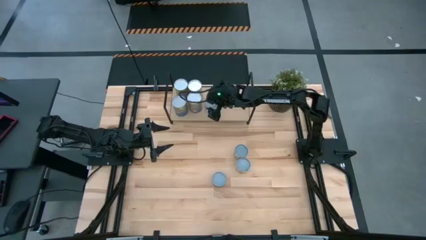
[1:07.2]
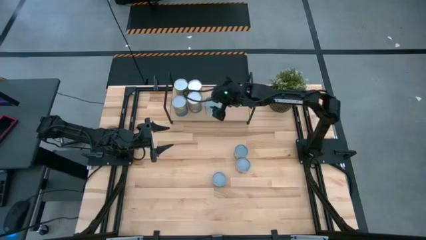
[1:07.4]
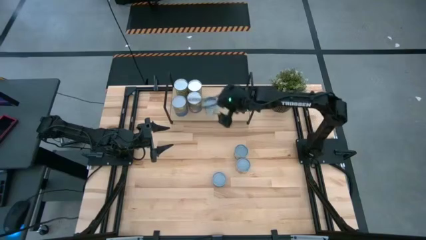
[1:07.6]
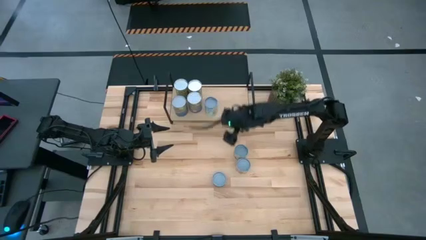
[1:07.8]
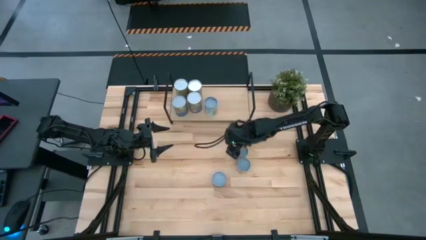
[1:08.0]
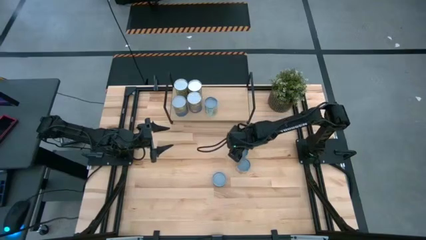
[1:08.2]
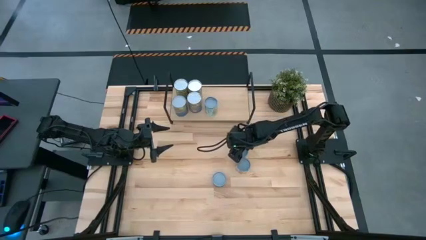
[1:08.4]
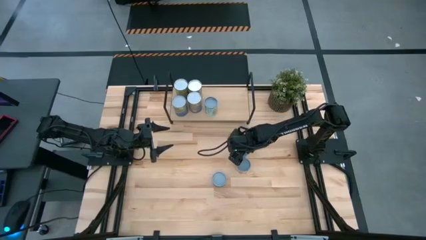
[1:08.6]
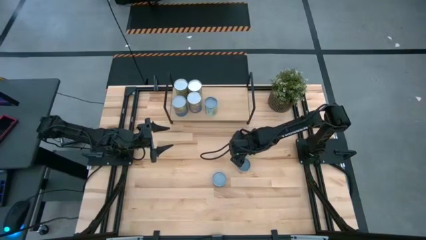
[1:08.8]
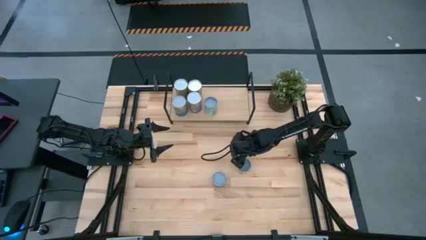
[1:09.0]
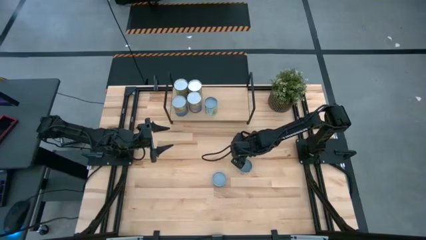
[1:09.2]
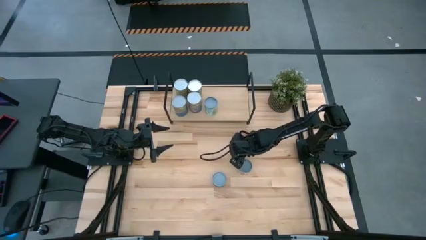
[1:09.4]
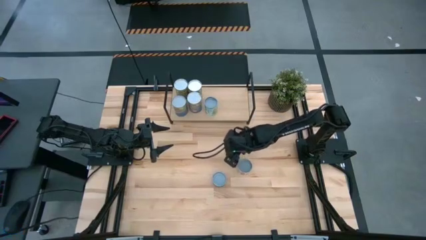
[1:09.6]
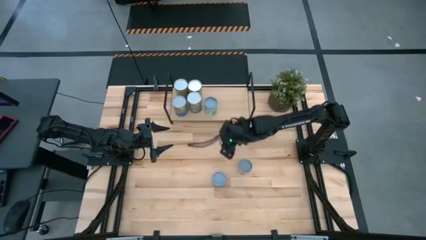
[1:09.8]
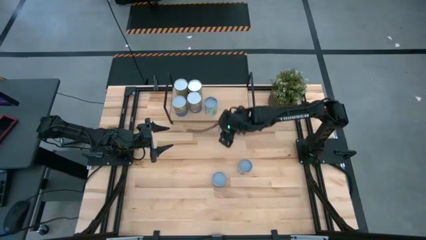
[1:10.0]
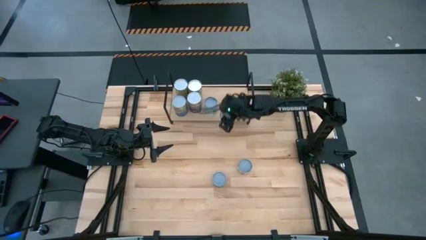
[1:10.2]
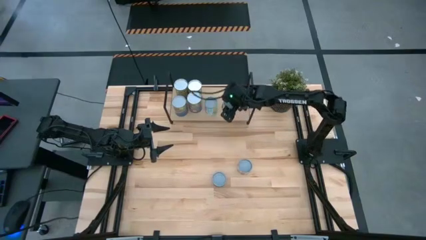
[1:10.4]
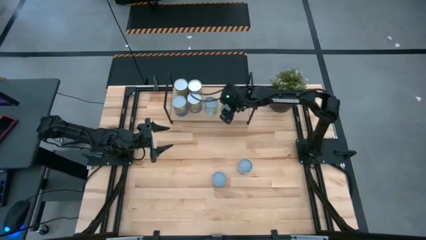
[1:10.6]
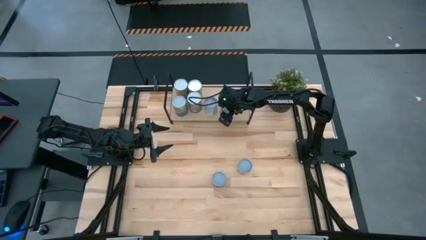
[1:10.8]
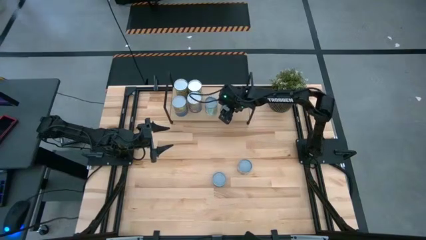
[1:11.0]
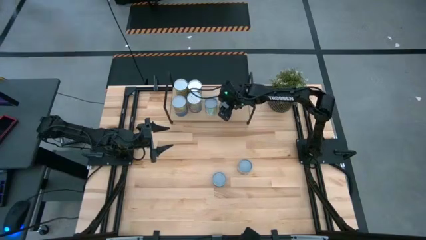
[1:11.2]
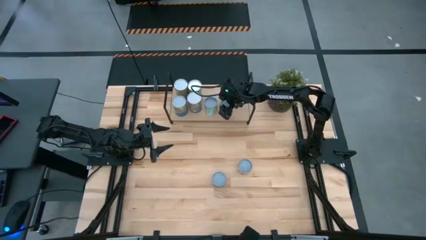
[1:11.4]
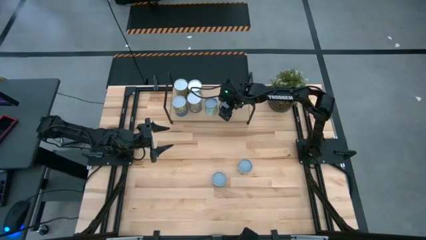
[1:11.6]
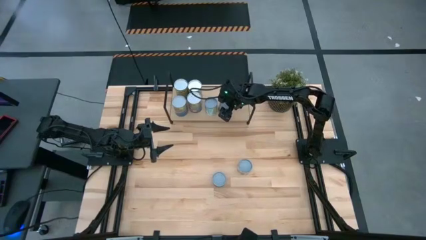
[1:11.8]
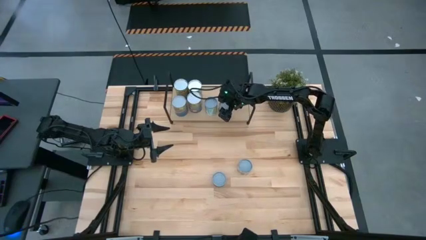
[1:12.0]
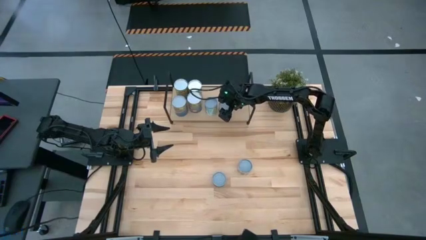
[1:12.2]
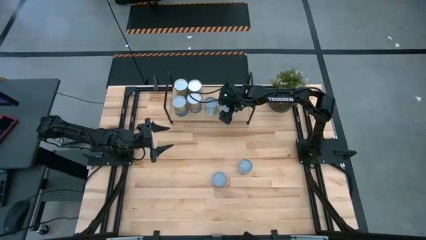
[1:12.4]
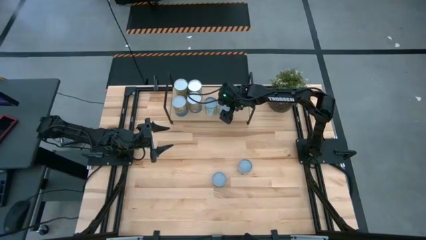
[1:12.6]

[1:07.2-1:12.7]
Task: Pick and place cans onto a shelf
Put the small canned peas on the shelf

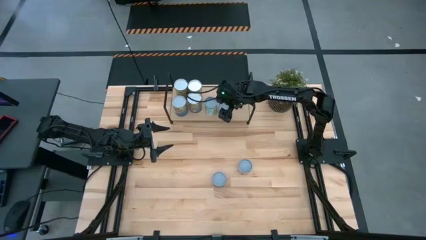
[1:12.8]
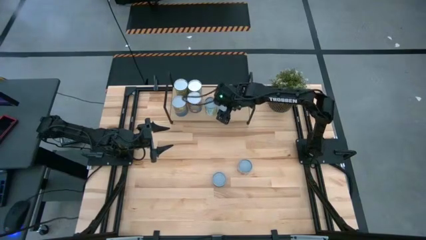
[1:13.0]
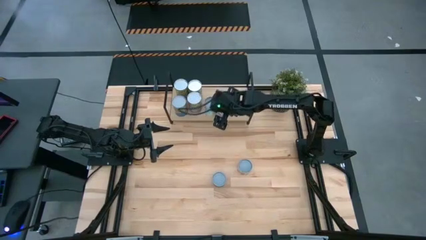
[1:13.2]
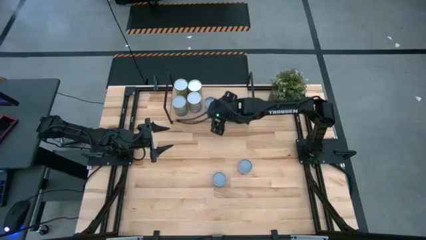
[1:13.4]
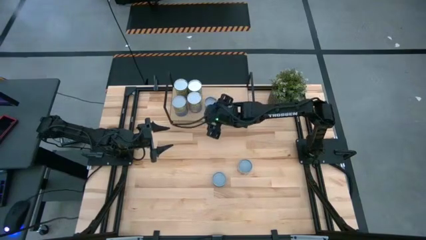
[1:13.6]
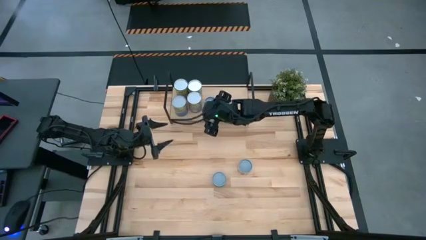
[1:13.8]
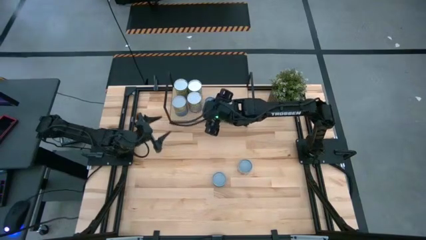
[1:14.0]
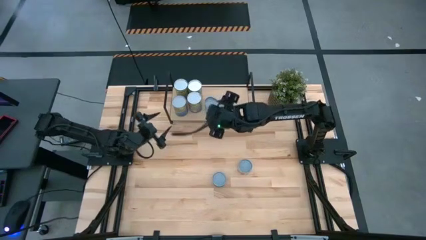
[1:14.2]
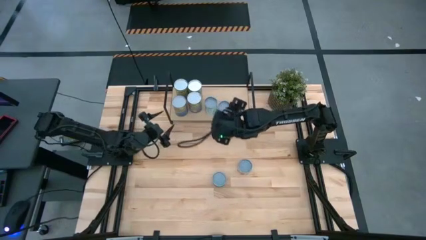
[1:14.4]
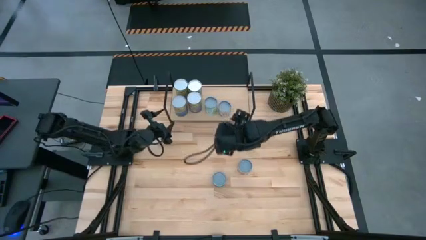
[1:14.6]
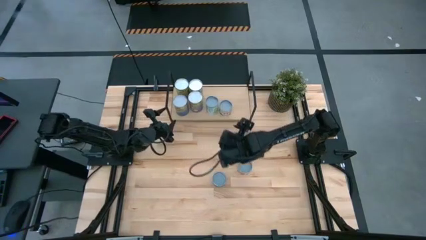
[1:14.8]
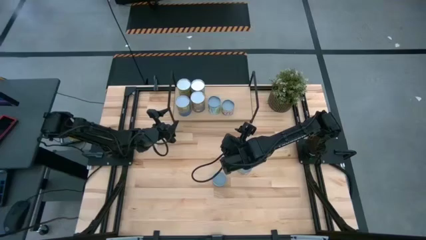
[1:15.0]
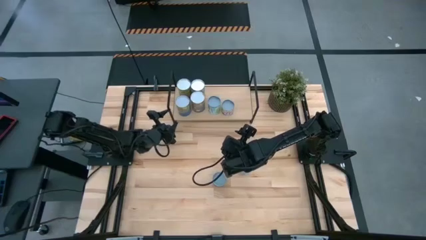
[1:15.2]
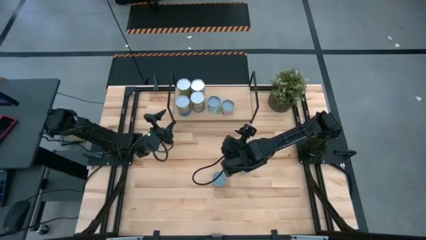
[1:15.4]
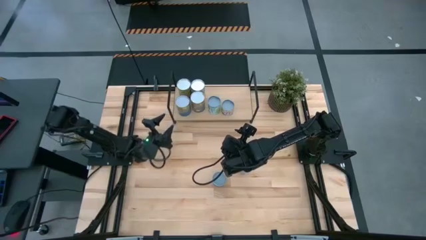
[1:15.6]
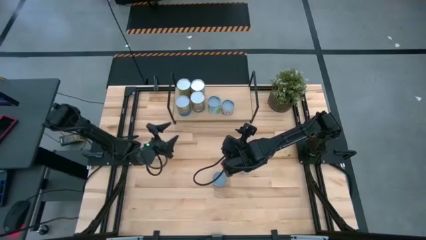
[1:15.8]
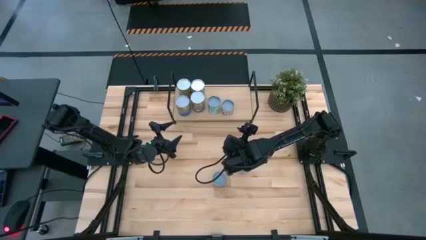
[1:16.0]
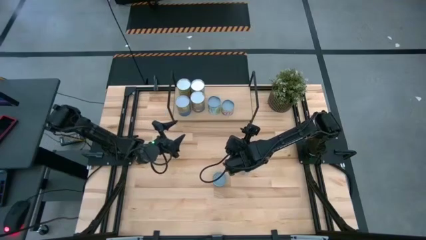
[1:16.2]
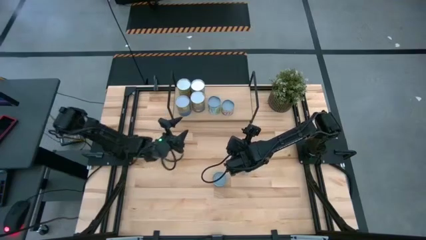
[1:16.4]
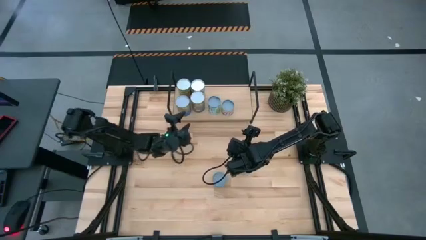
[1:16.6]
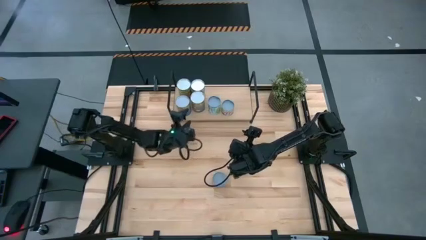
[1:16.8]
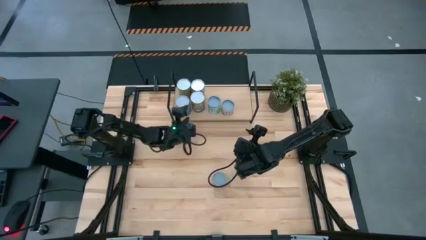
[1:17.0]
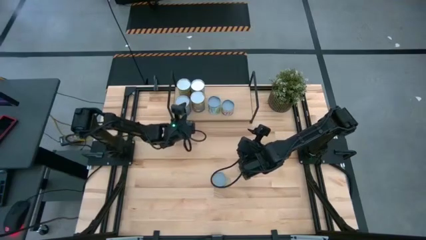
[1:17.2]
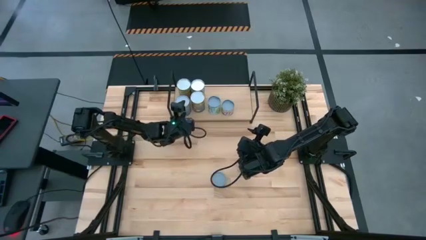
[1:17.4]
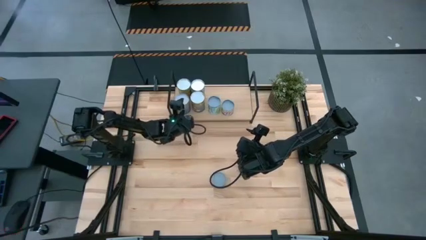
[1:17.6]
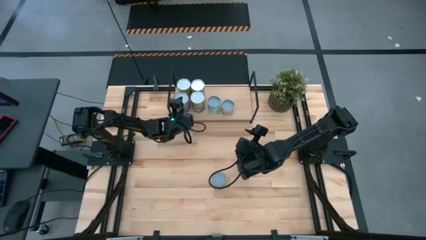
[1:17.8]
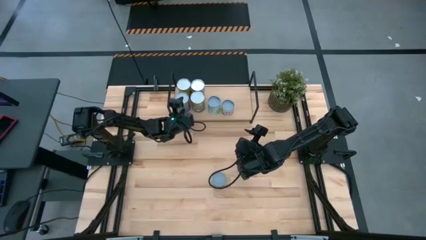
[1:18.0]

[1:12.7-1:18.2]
Adjust the canned peas on the shelf

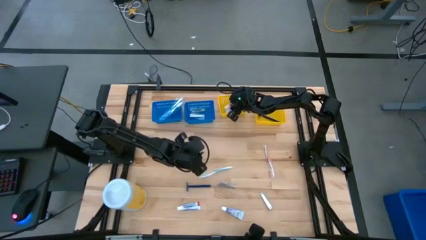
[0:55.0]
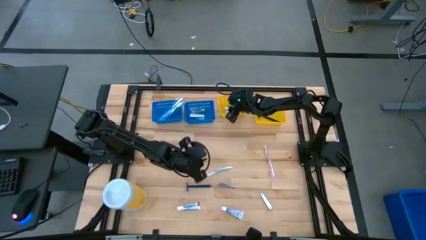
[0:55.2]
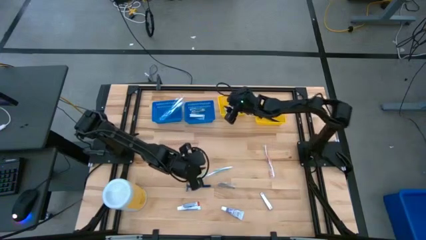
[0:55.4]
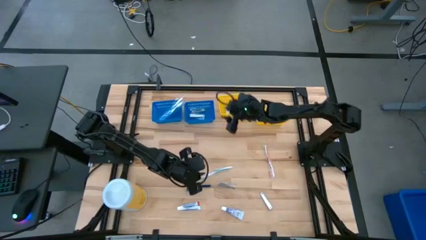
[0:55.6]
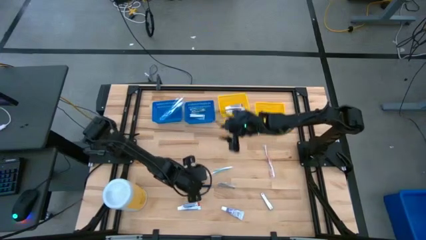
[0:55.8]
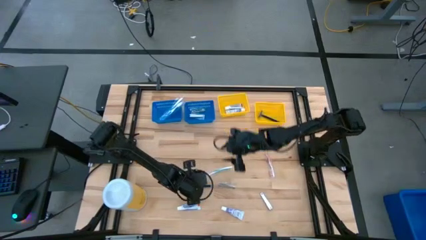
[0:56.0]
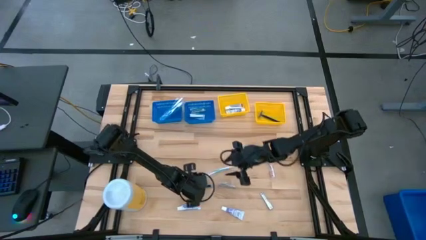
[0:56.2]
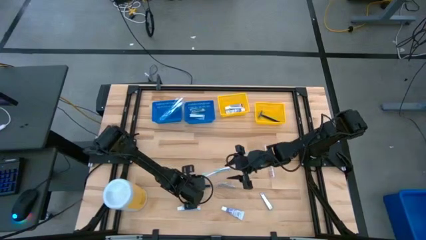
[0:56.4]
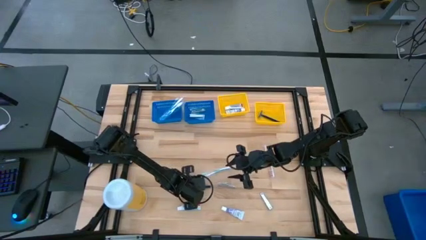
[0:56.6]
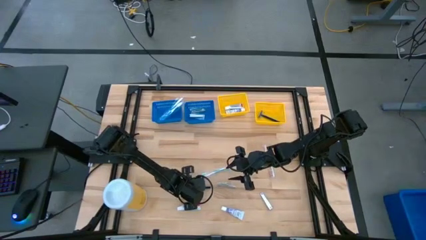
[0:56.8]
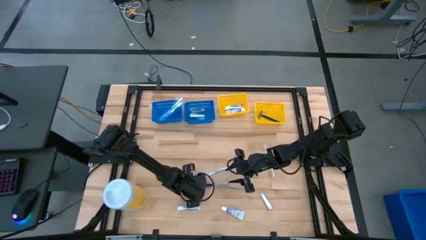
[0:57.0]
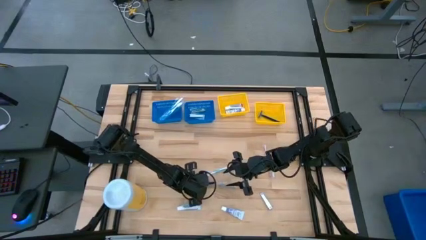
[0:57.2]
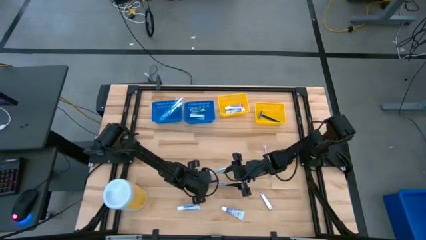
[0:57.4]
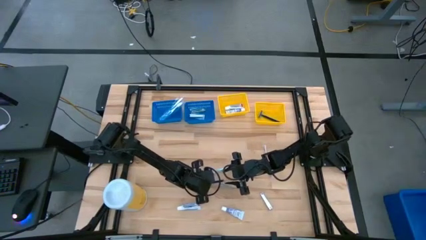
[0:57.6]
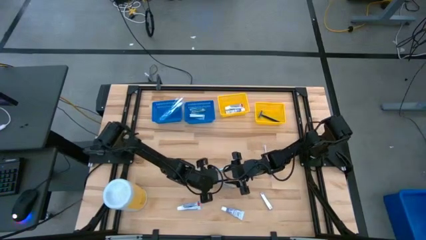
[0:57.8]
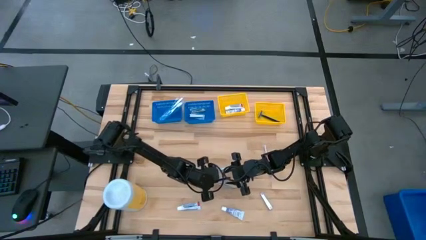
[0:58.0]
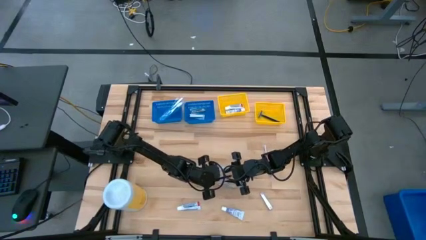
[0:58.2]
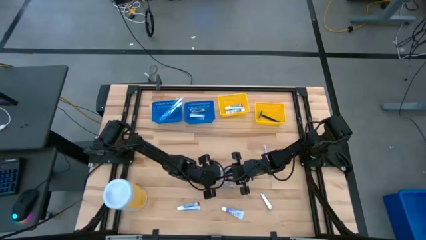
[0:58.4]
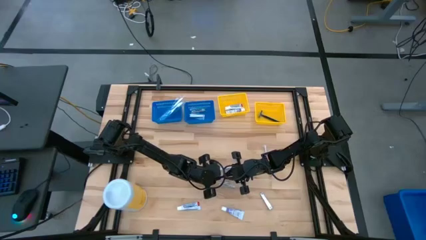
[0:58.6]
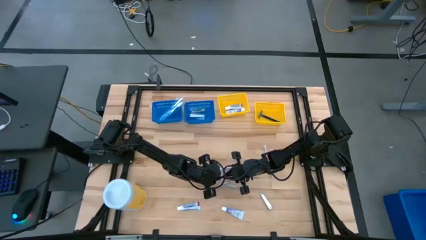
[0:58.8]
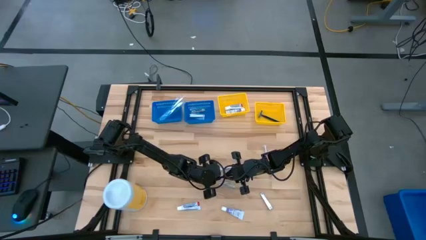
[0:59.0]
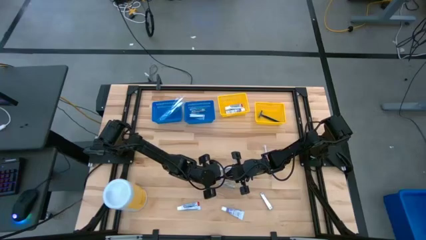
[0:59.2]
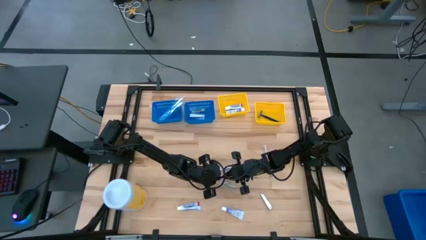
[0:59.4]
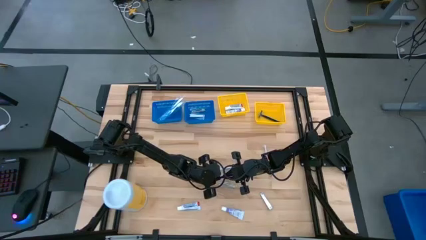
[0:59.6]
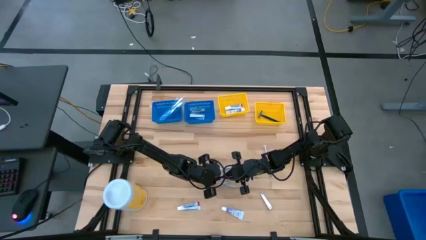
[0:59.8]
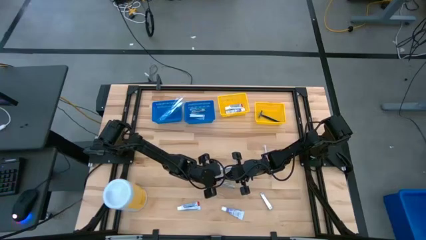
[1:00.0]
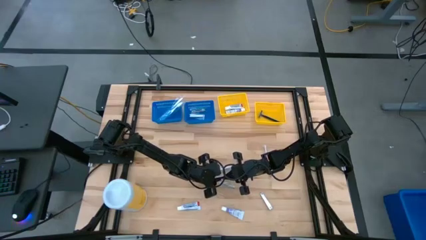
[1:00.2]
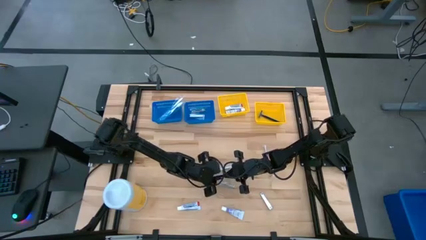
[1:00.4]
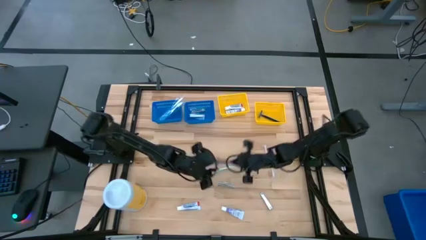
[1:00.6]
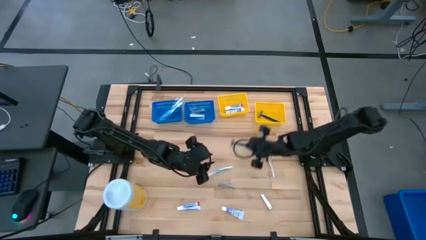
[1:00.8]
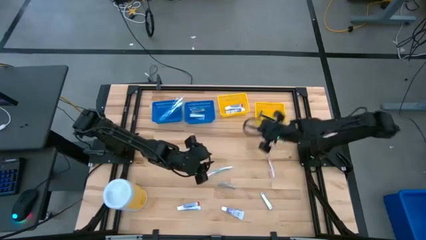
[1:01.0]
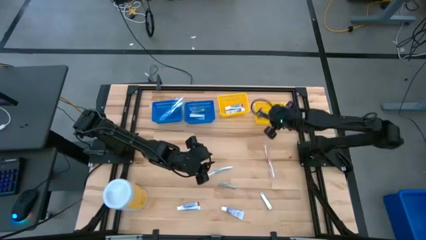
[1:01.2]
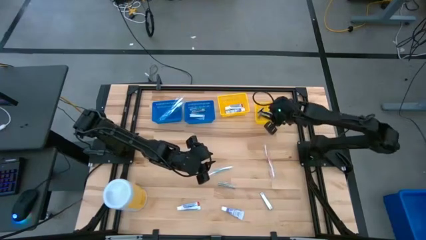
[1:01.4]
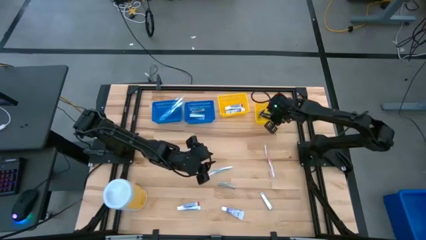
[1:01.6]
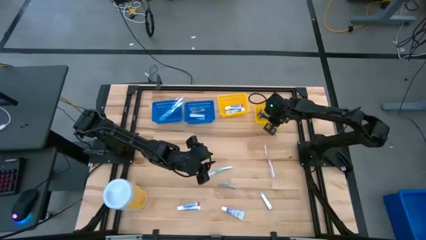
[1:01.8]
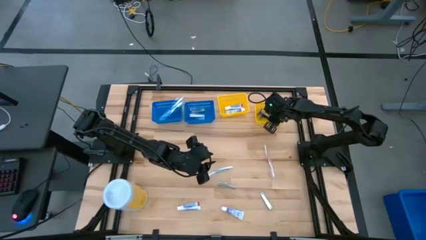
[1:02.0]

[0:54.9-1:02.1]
Task: Pick & Place Travel size toiletries
Put the blue razor into the right yellow bin
